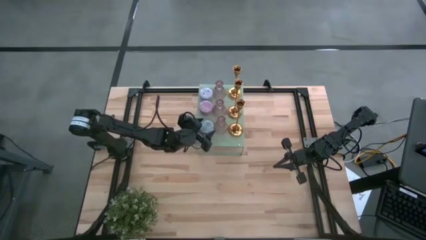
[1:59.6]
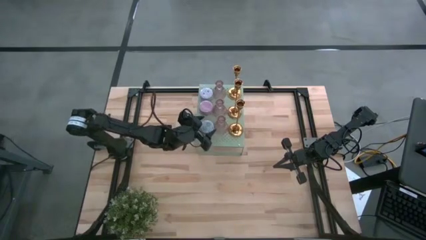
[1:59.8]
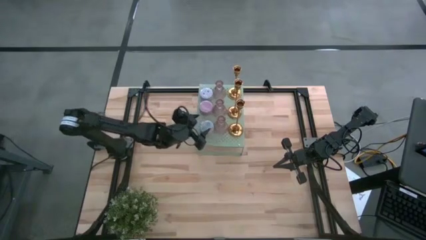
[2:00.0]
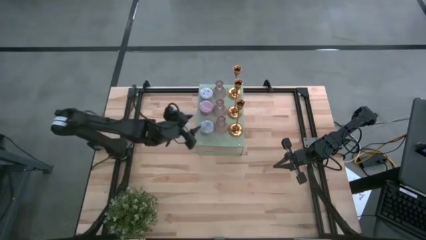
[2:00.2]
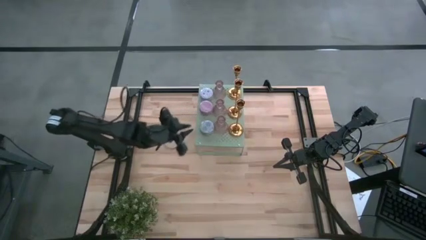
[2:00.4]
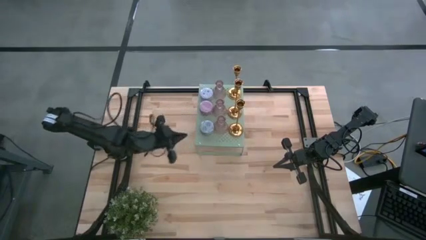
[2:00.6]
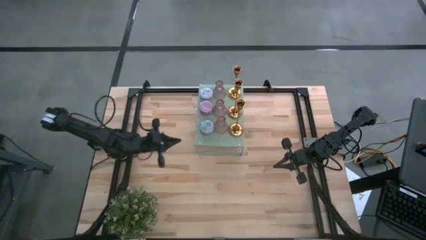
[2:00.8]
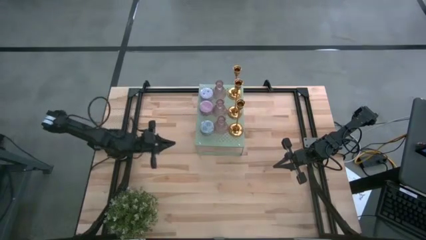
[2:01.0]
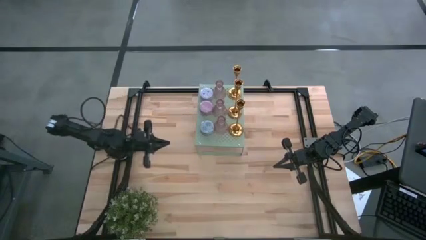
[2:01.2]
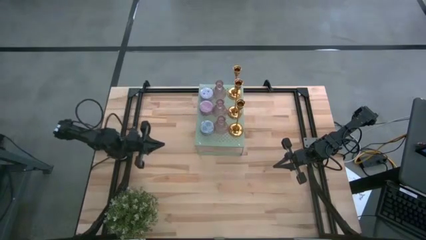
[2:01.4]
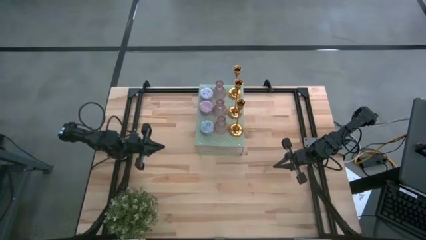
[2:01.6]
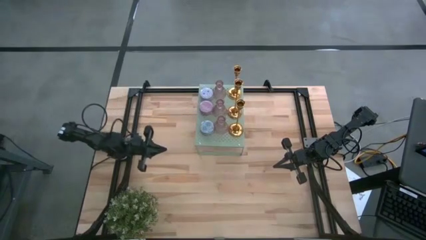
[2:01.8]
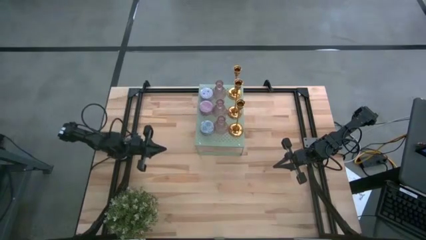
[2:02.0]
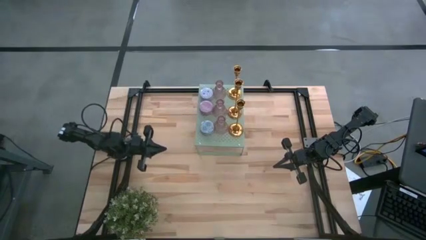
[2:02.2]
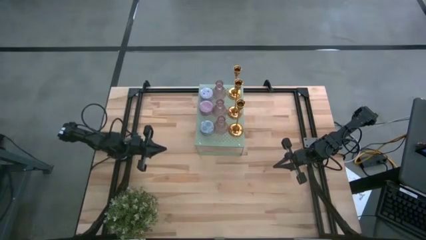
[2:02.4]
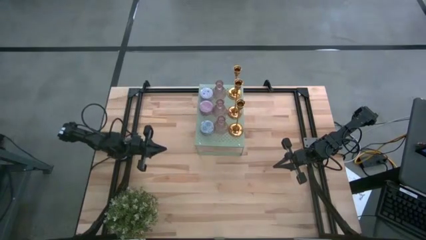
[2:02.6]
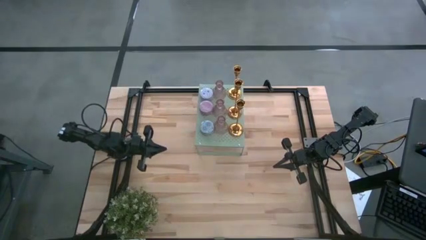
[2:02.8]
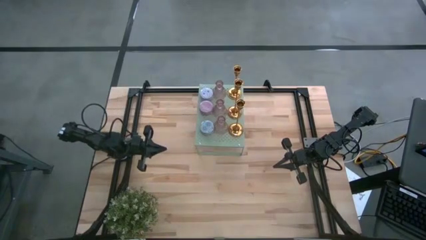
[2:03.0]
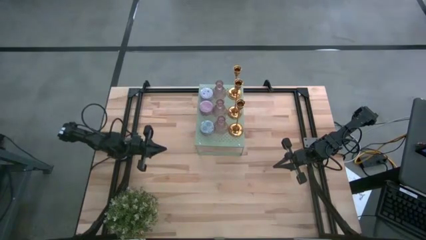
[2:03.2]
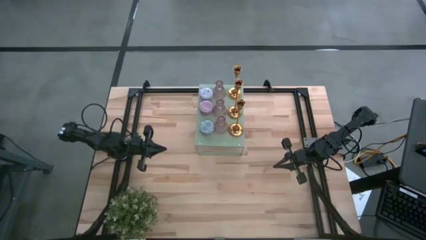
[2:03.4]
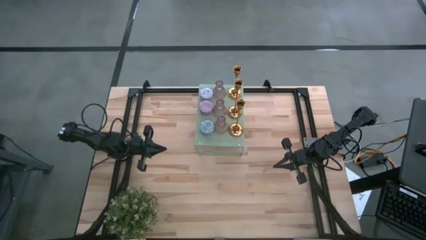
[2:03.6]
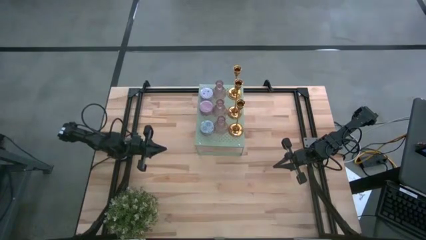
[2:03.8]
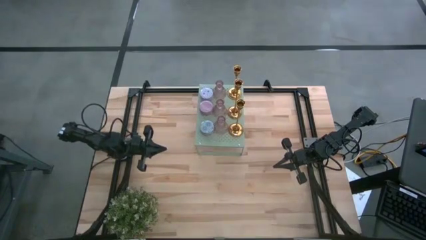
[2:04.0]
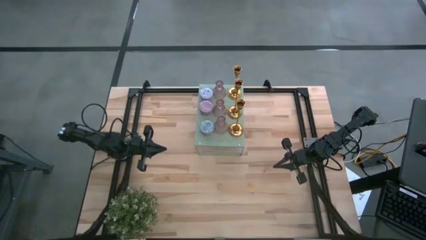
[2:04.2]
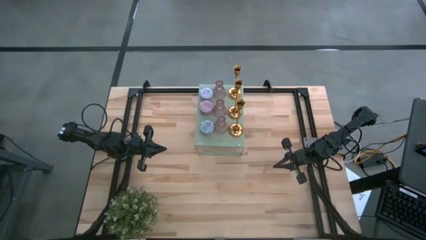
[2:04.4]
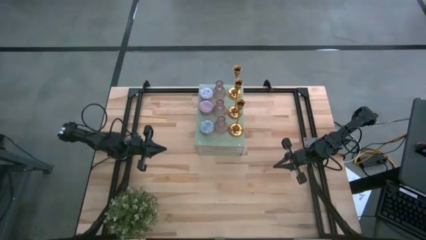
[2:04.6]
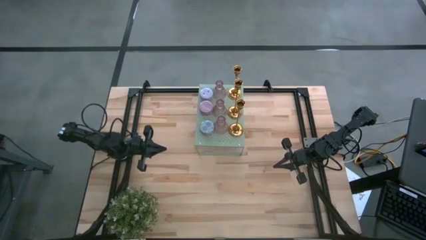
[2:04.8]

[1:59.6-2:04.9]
Task: Pick & Place candle stick holders
Return to Home Position
